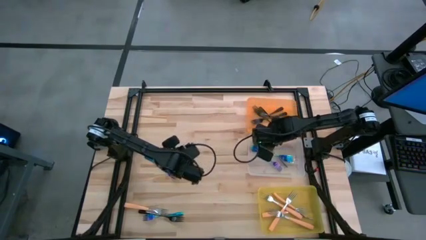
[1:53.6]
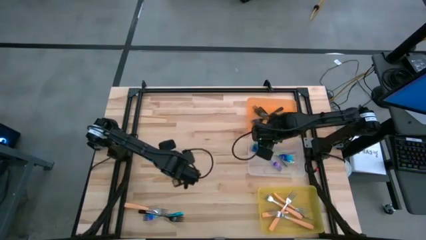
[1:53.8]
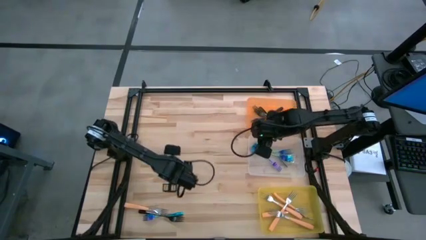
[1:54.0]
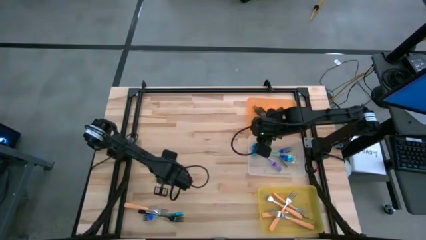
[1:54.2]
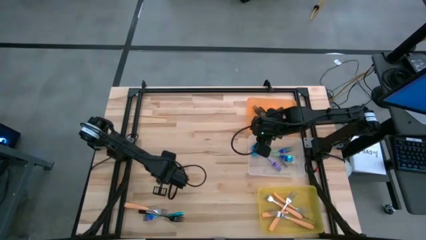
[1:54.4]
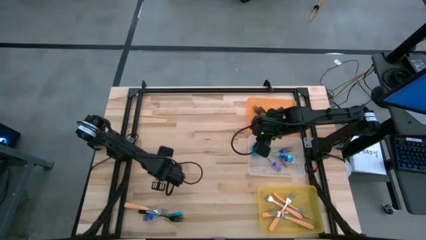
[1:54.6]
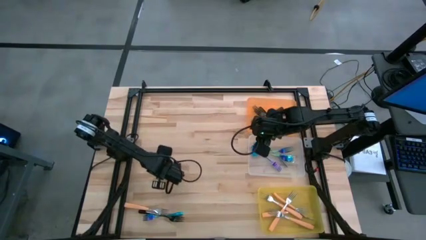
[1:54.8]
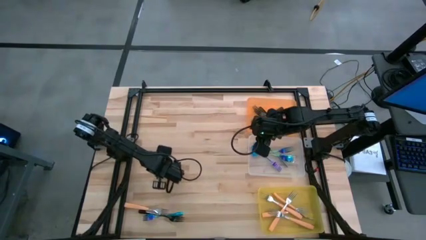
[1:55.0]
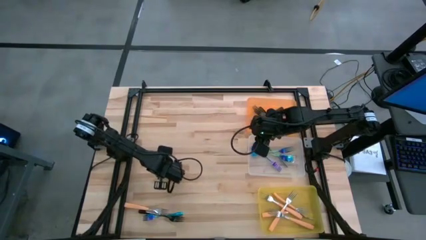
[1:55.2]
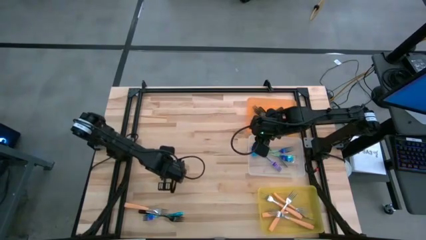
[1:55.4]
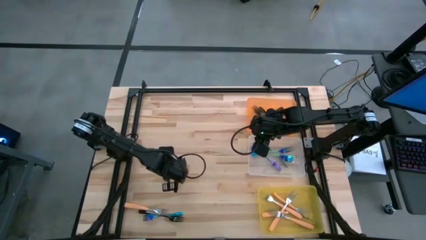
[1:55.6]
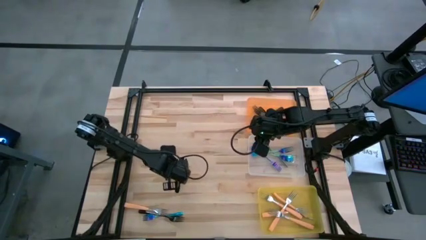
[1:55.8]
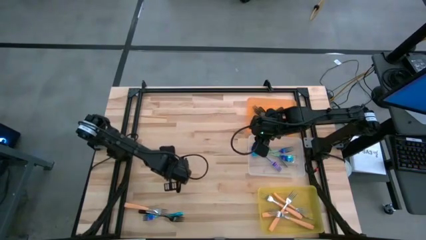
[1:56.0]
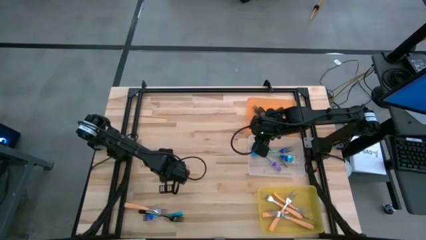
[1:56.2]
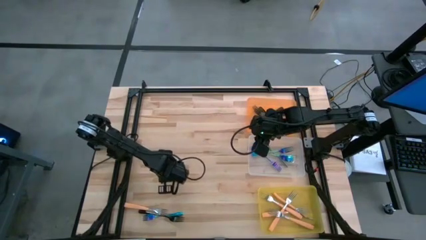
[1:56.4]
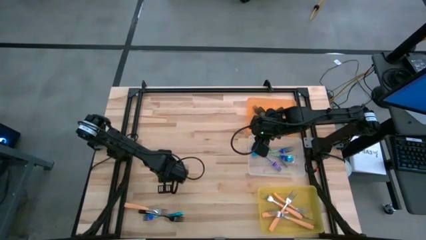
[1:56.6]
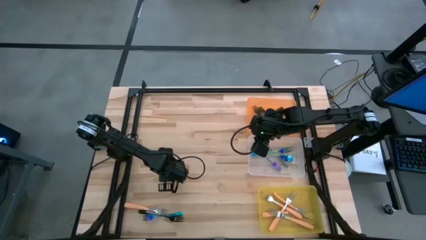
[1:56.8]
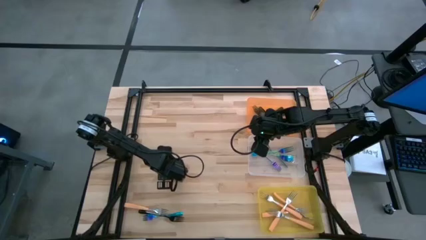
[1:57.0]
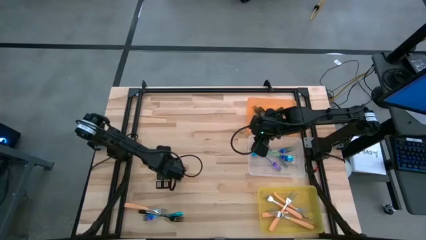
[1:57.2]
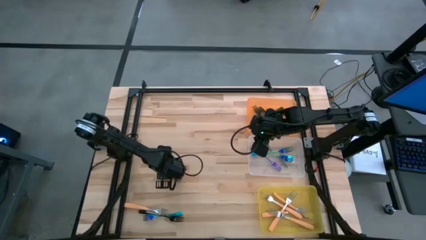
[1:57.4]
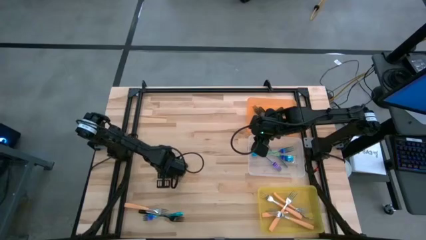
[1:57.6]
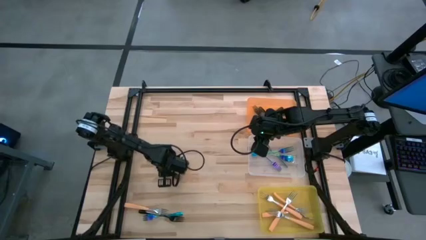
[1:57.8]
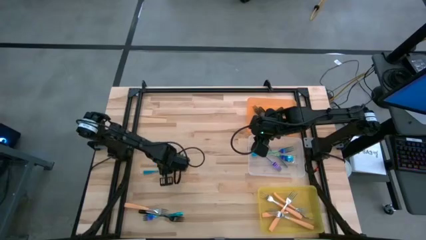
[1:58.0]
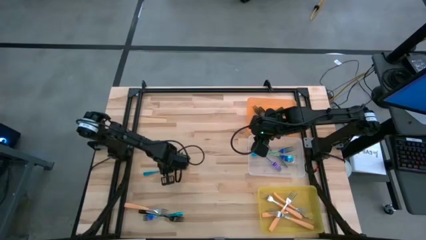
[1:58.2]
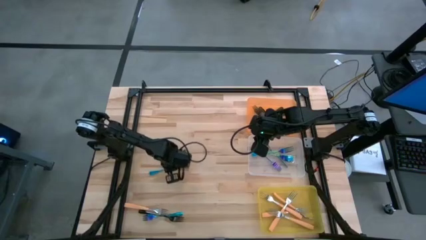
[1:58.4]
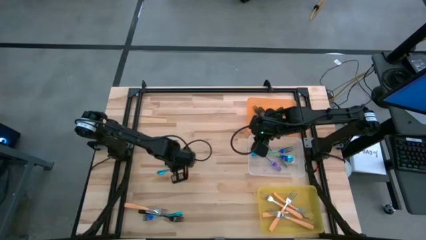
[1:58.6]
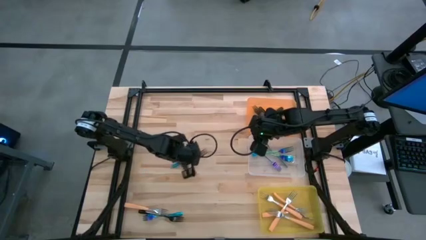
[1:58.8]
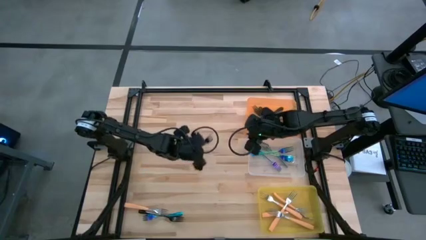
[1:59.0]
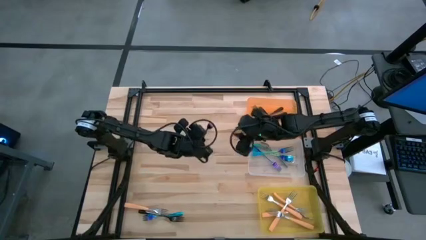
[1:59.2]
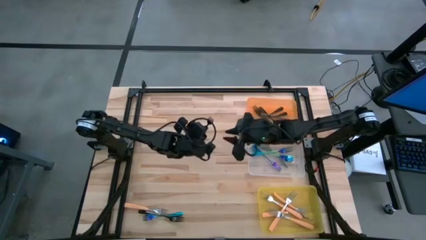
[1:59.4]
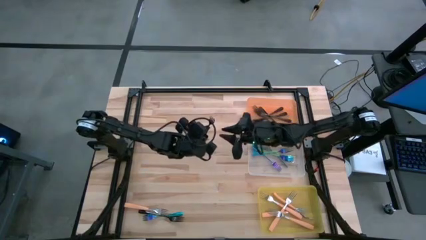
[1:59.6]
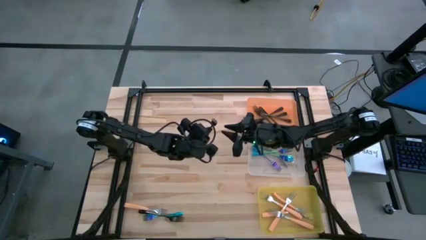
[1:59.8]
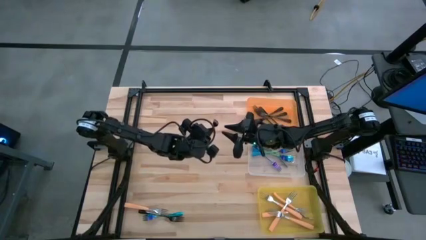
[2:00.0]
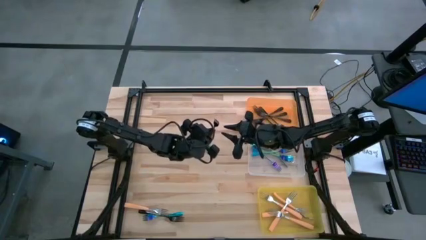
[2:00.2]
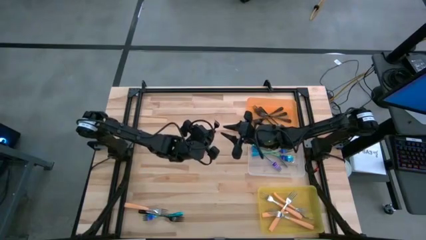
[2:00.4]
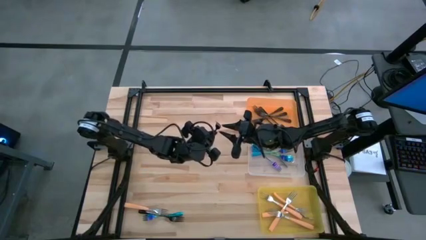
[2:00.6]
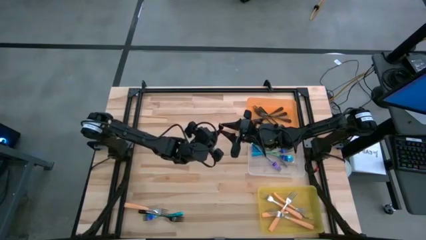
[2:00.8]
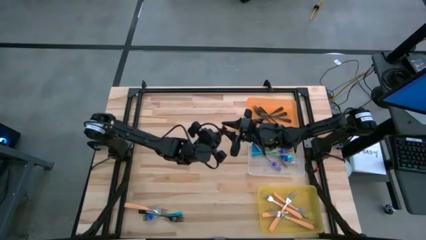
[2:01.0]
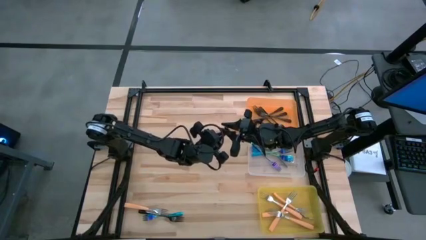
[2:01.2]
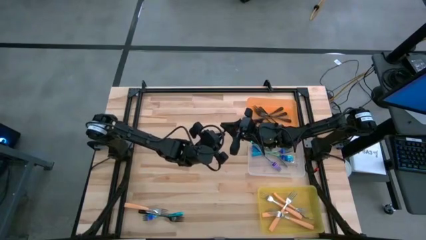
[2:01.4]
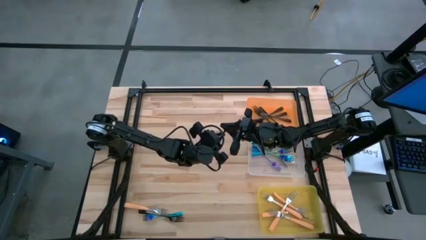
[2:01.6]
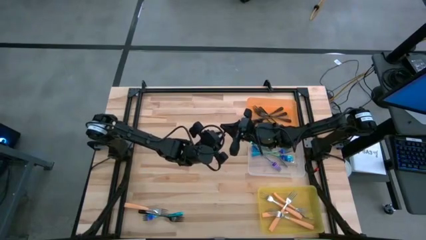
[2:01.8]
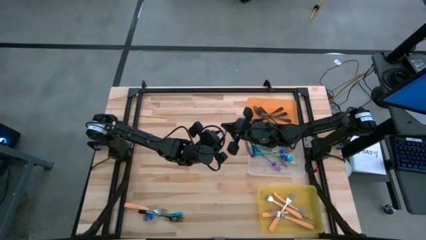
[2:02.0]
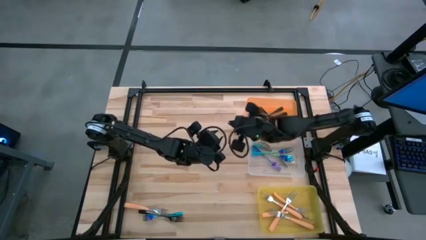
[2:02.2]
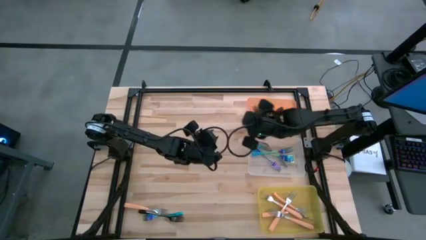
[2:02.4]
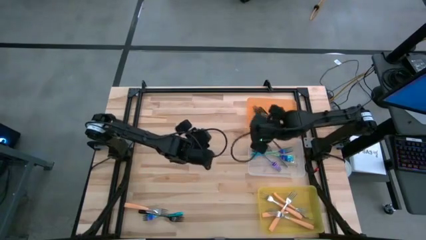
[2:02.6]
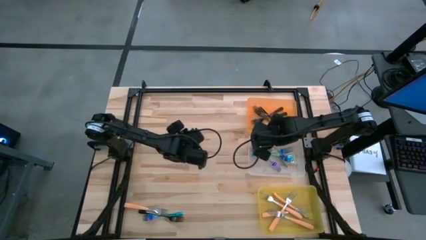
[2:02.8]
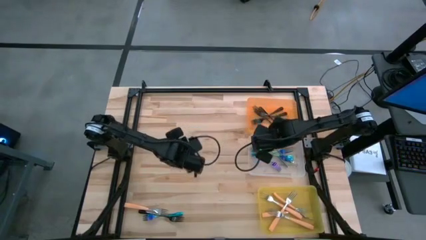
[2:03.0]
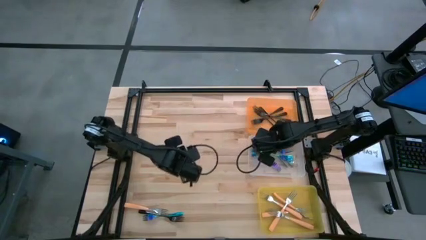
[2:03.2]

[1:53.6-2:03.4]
Task: Sort silverware by color (type)
Put the blue fork into the transparent bin

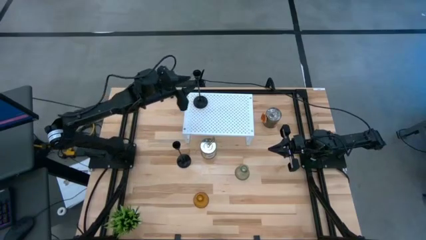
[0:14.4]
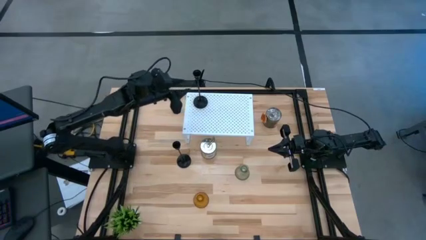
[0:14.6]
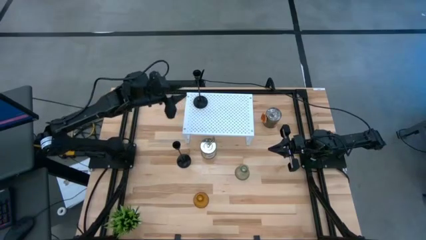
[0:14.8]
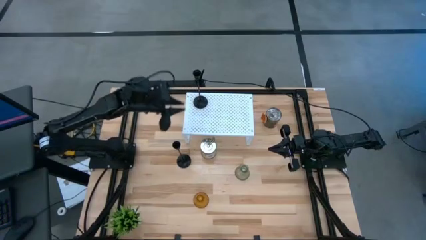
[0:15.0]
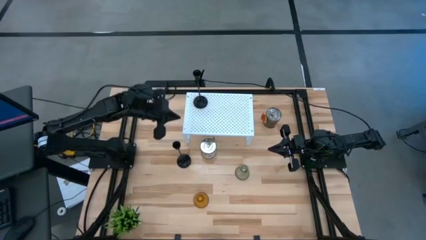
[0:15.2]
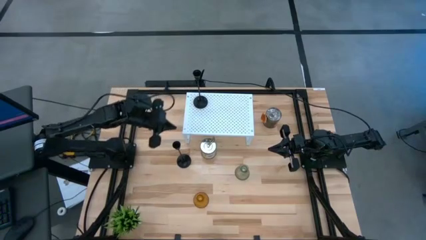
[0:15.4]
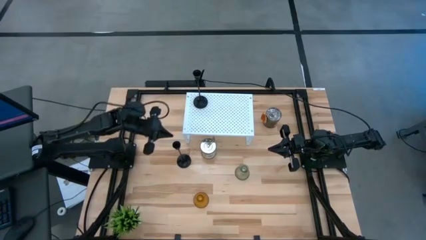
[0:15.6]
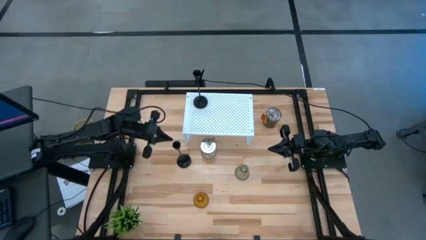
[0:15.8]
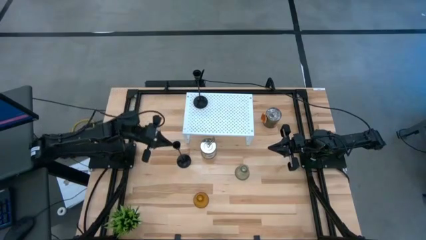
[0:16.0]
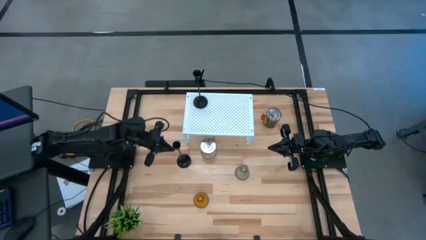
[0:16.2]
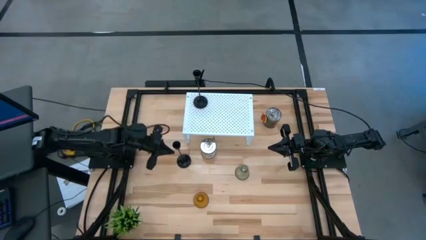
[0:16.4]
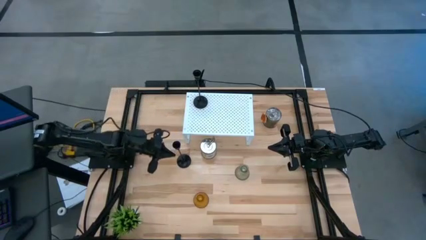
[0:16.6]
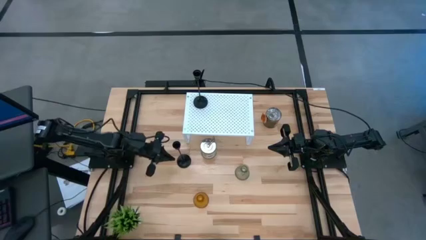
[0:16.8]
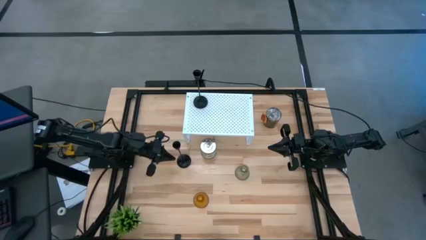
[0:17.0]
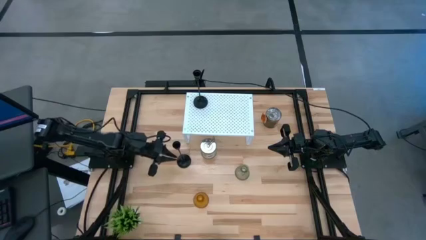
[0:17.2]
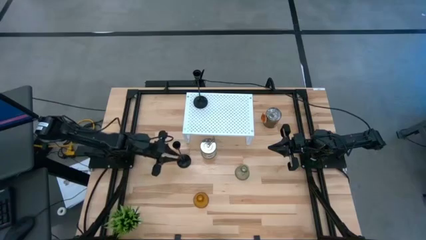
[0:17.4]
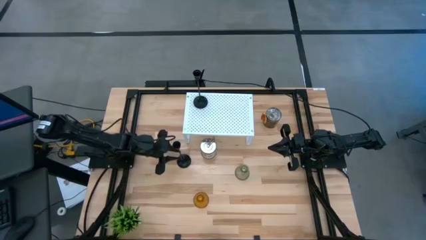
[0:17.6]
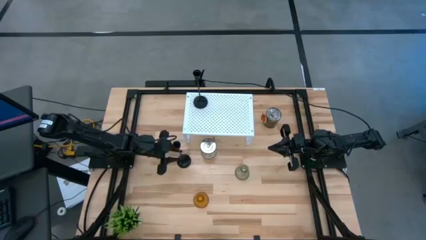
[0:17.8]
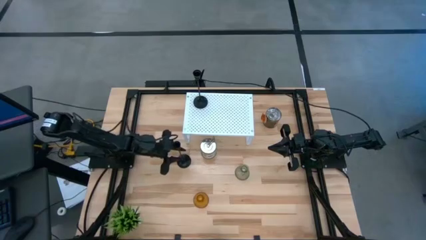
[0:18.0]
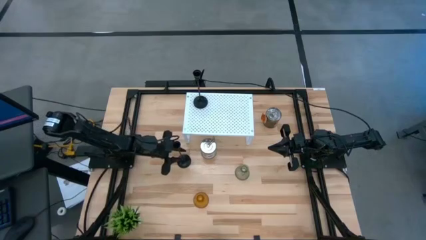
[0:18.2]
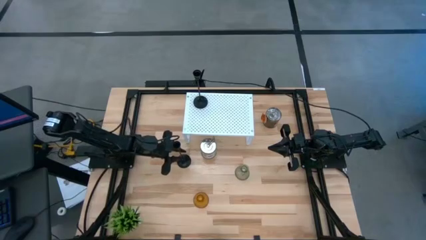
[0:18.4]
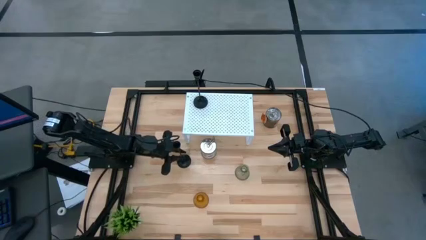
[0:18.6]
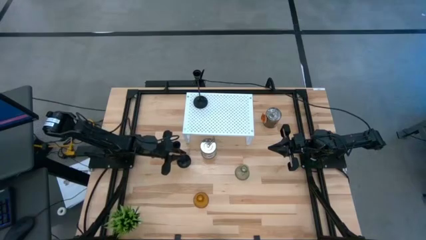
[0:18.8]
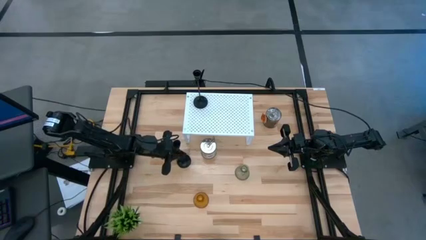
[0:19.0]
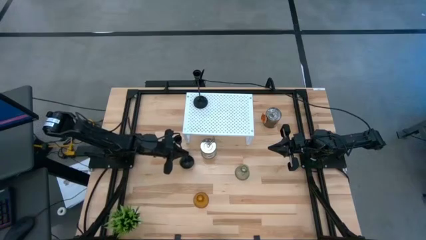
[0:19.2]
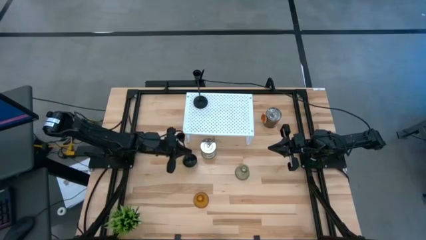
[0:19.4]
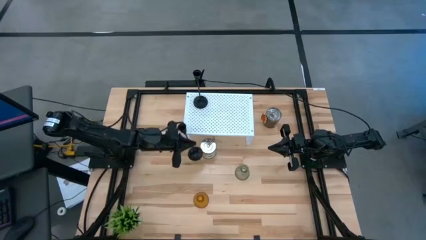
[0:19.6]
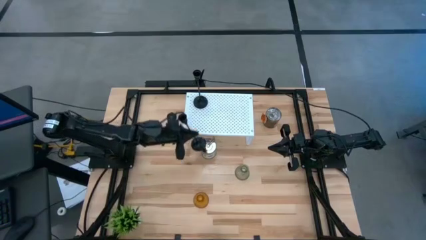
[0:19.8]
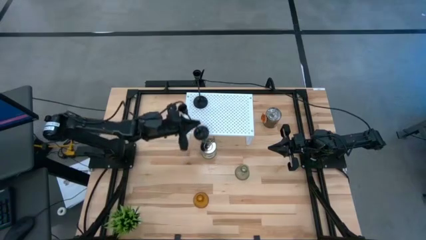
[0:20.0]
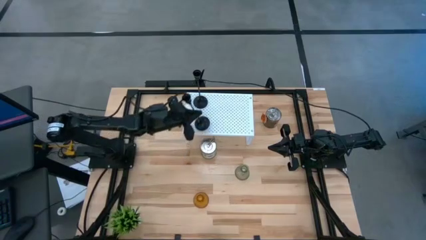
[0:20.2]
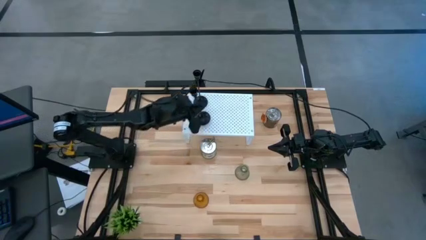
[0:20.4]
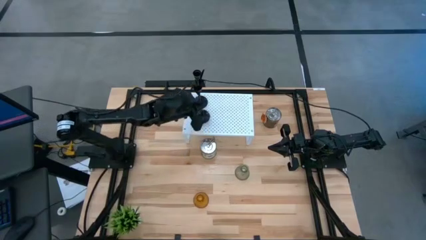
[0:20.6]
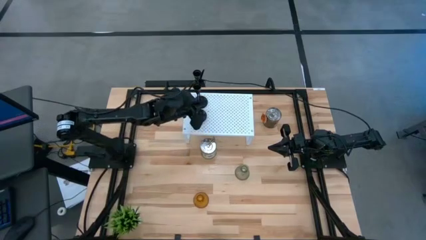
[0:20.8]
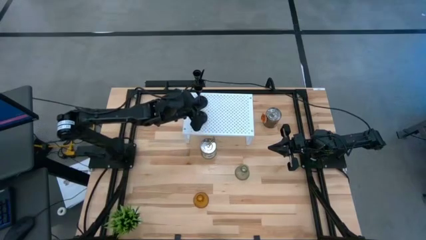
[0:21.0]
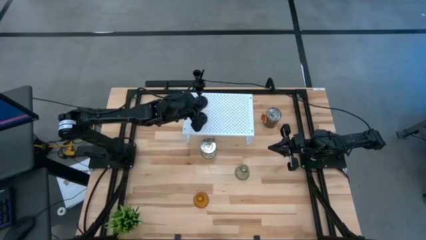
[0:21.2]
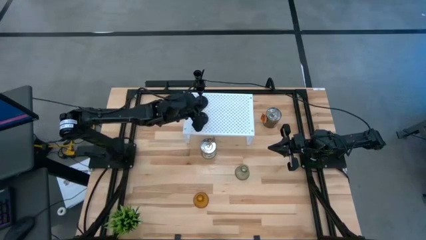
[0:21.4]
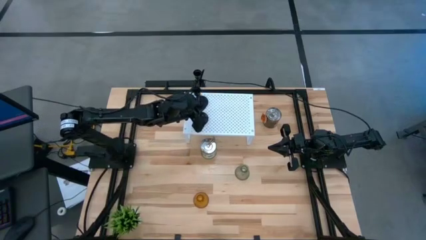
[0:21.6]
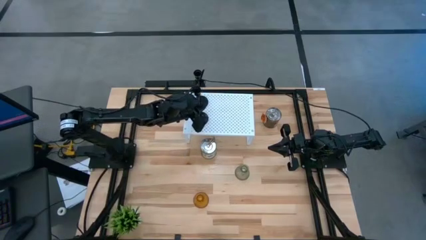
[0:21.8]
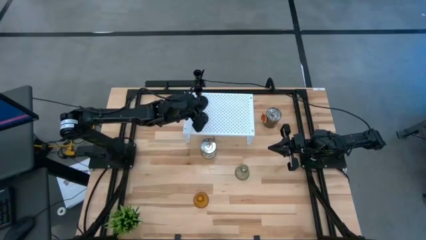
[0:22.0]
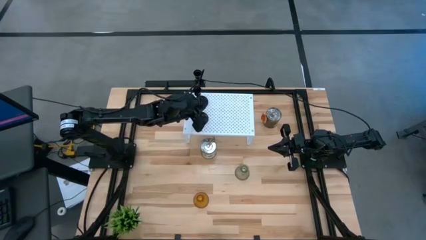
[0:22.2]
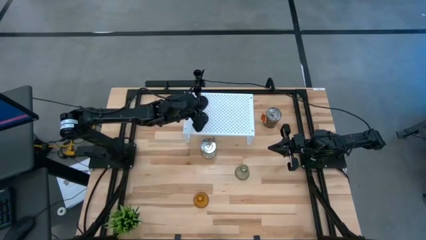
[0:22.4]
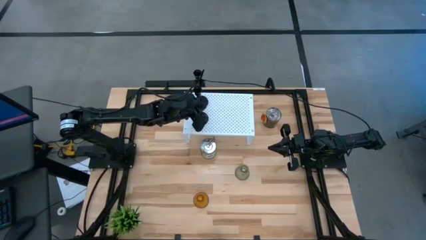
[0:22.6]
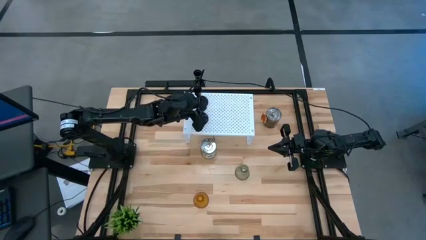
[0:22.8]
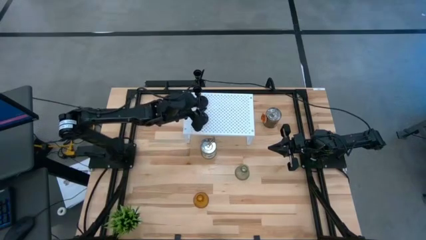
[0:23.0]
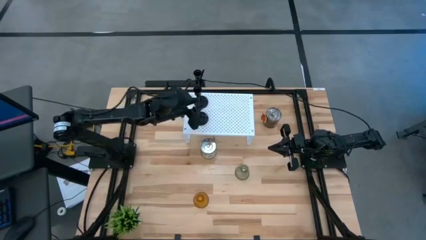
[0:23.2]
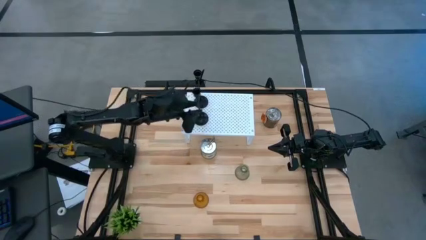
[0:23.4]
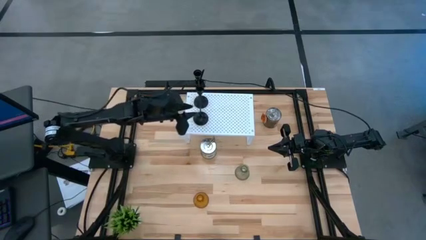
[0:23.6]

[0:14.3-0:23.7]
Task: Pick & Place candle stick holders
Put the black candle holder on the shelf
